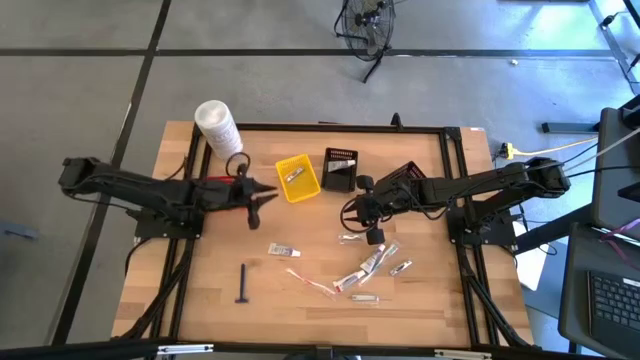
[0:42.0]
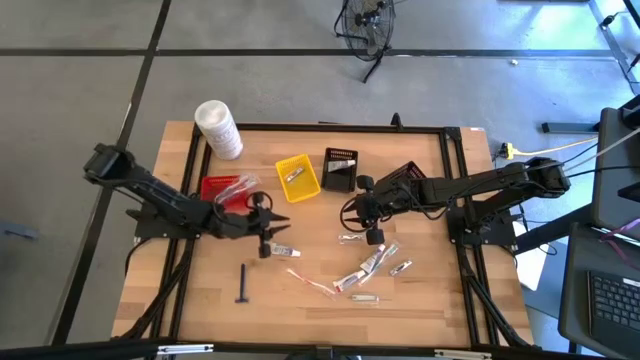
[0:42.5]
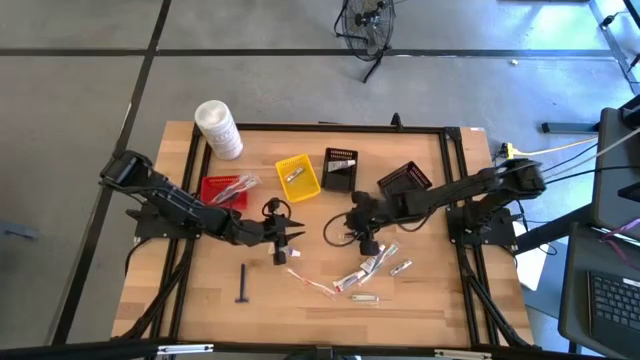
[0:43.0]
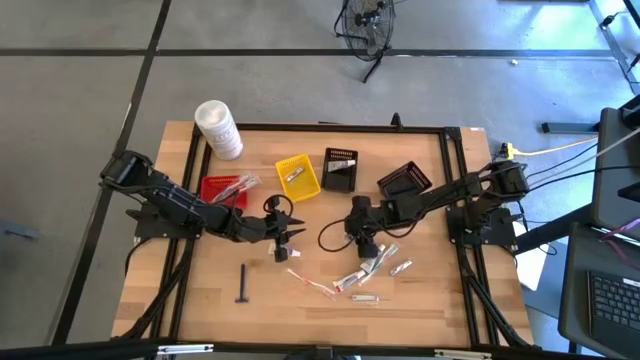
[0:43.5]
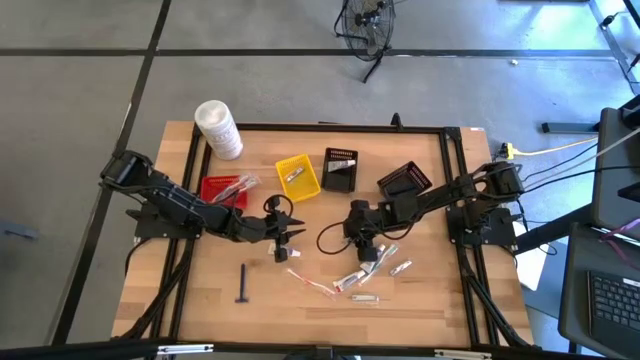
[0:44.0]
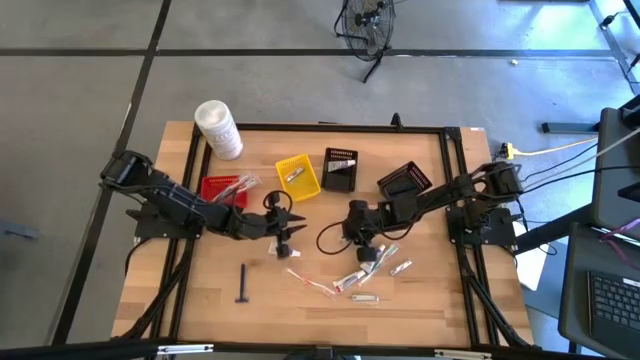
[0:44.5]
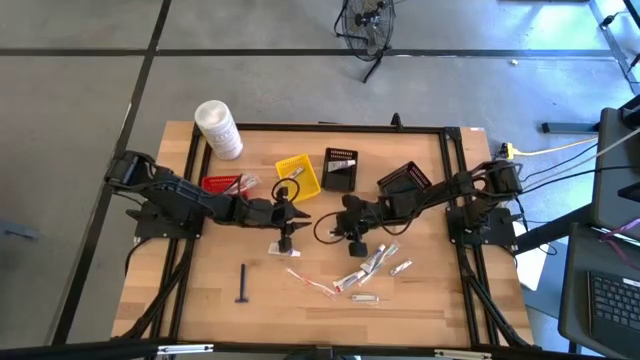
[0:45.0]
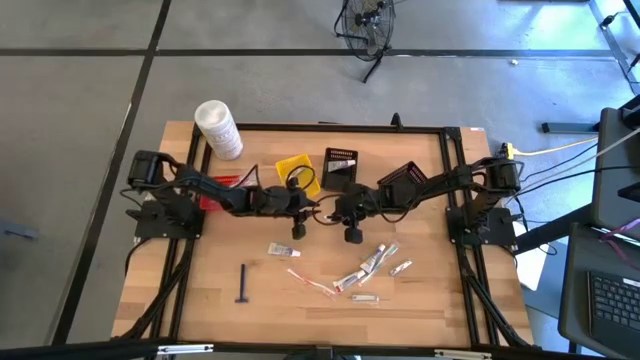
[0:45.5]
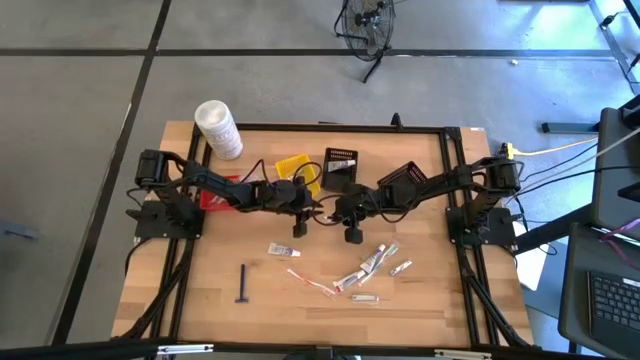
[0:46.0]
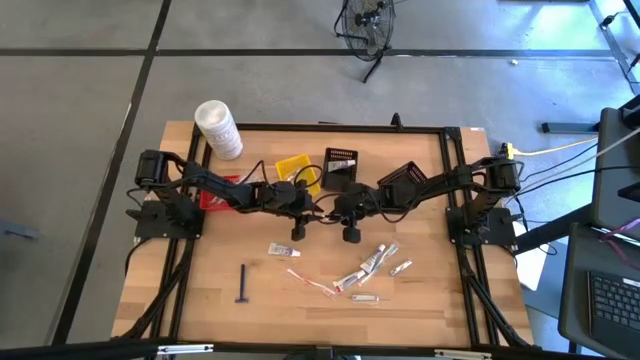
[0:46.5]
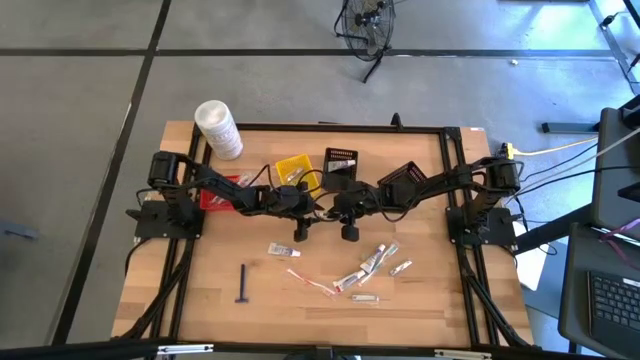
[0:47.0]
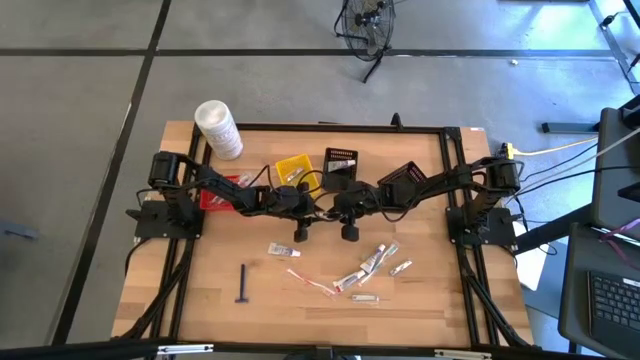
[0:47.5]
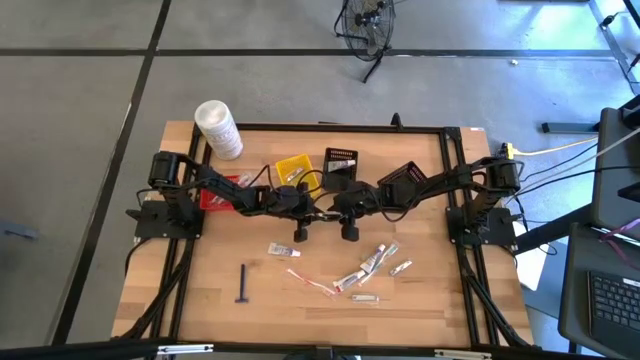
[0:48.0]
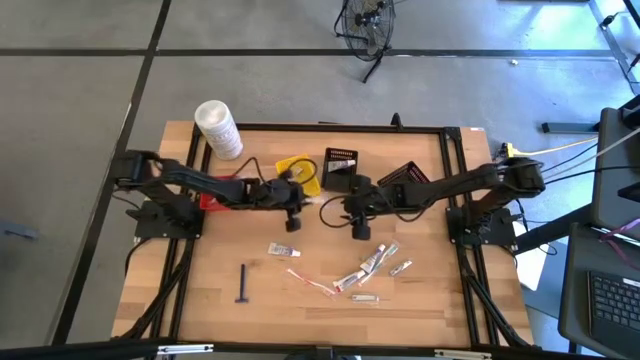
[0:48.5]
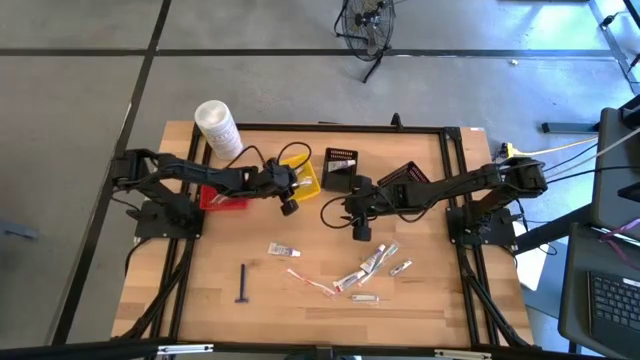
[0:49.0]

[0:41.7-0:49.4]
Task: Pick & Place Travel size toiletries
Put the nail cutter into the yellow bin

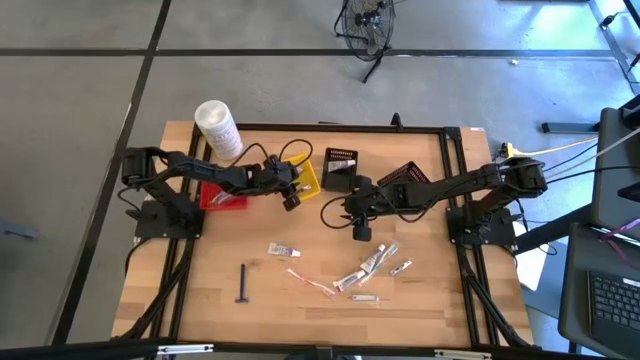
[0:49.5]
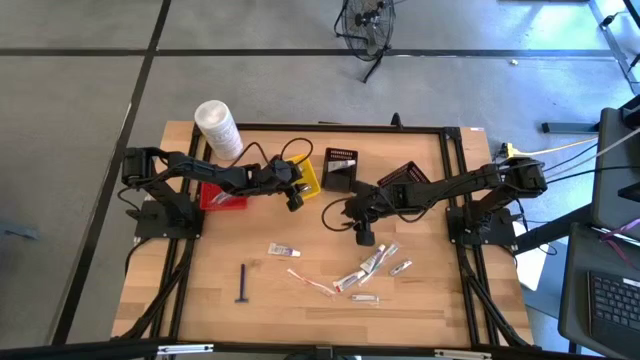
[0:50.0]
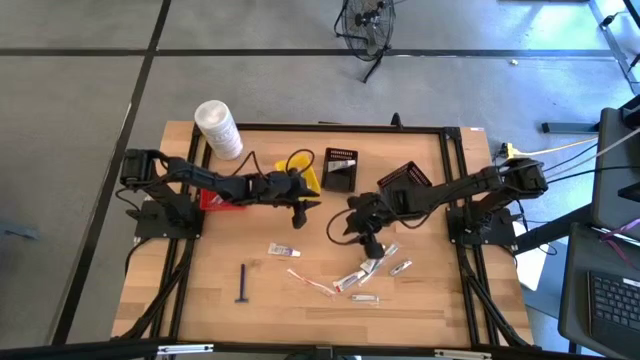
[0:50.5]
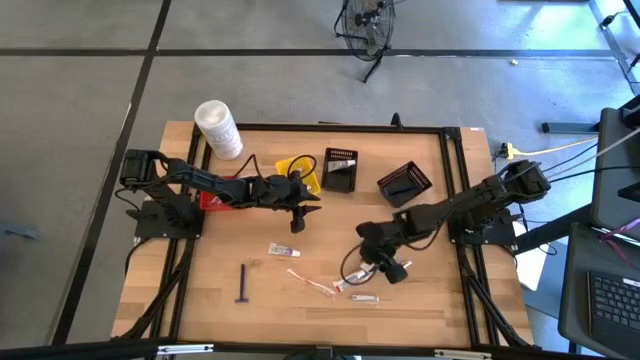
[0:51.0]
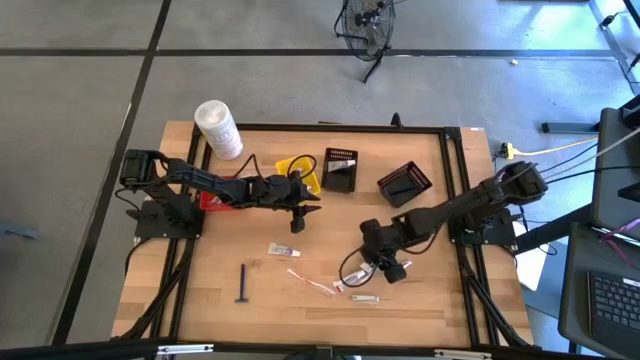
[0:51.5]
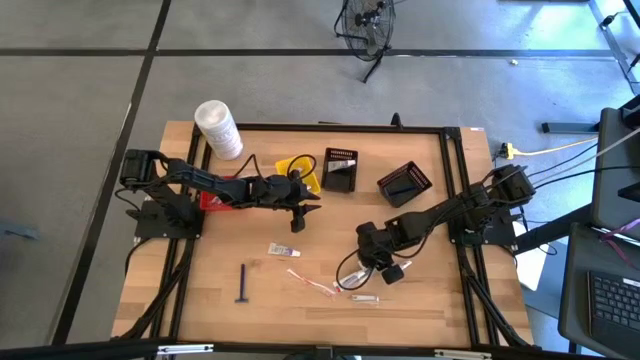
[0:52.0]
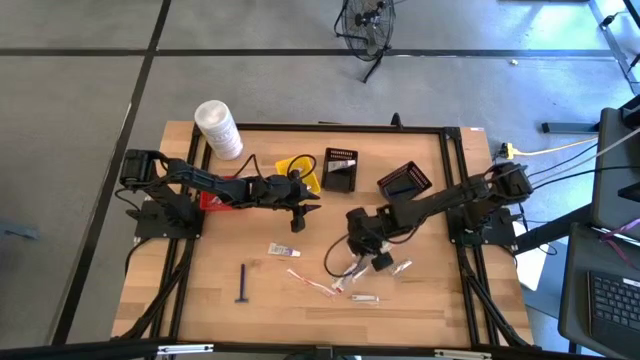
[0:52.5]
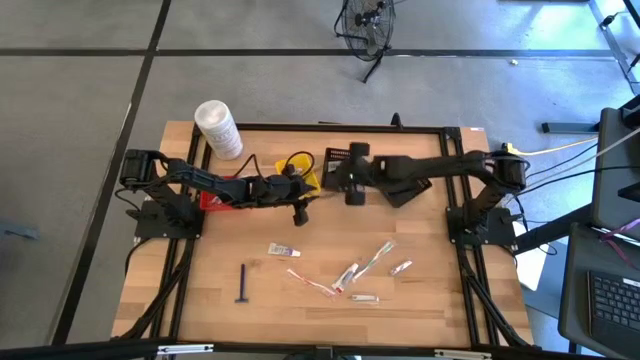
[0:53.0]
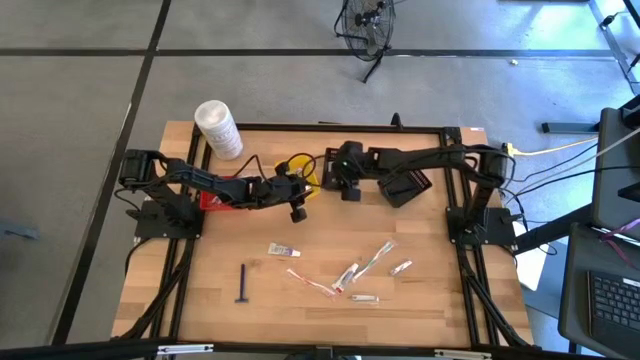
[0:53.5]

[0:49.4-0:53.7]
Put the toothpaste into the left black bin

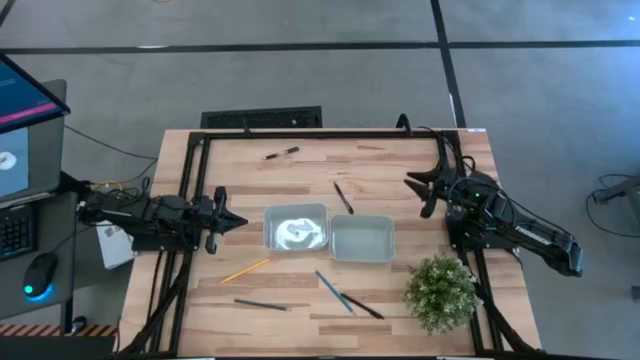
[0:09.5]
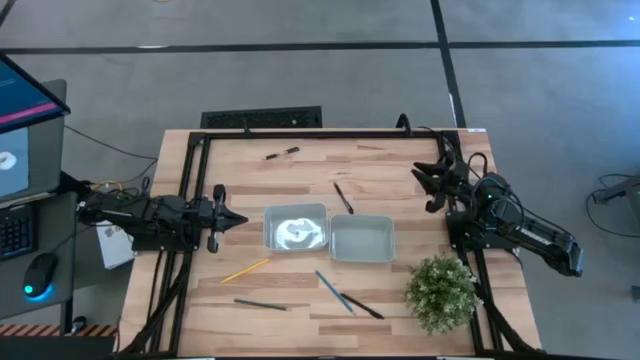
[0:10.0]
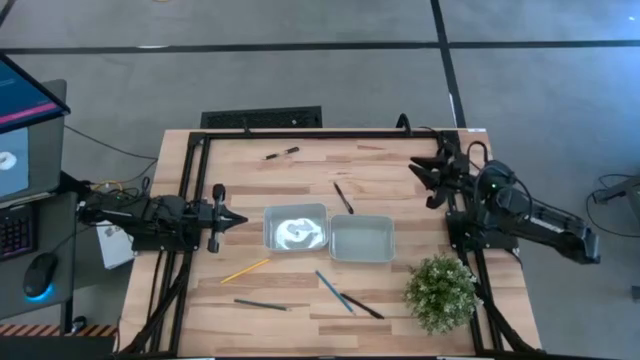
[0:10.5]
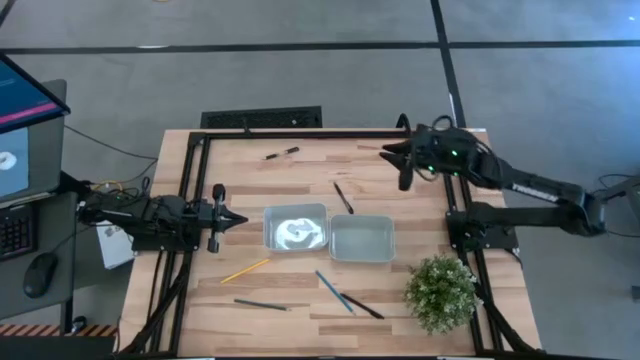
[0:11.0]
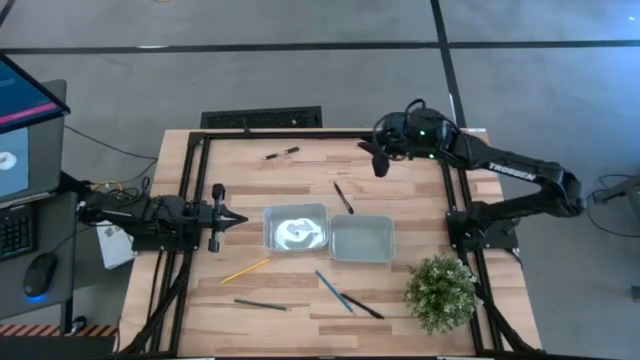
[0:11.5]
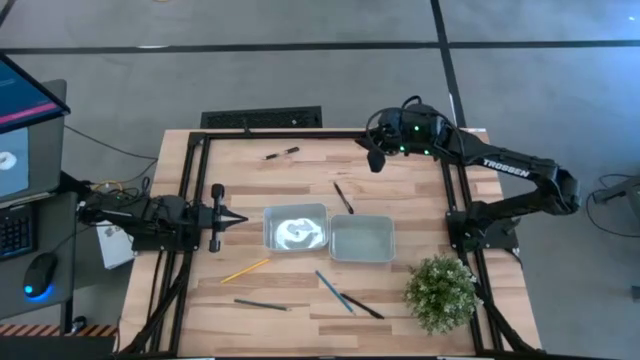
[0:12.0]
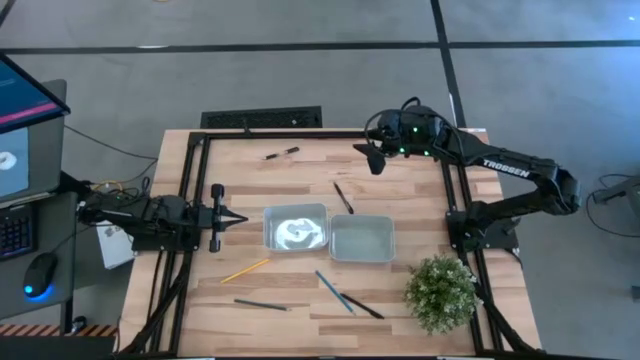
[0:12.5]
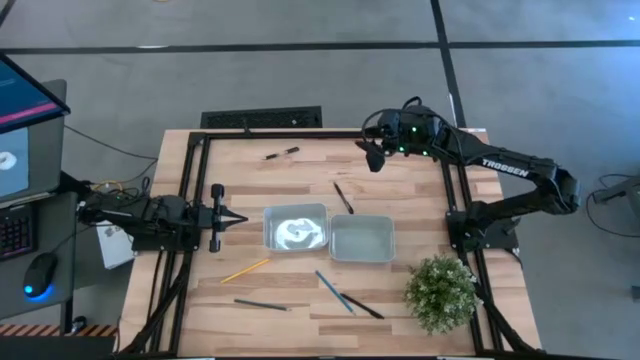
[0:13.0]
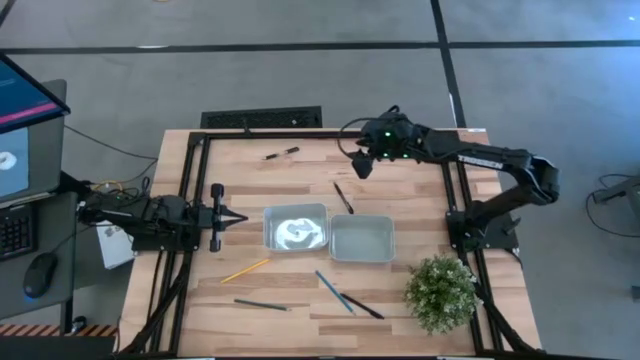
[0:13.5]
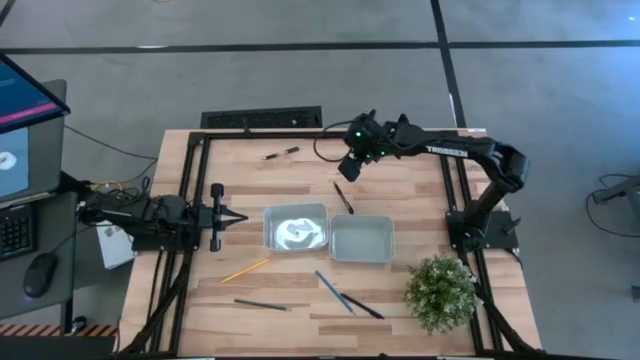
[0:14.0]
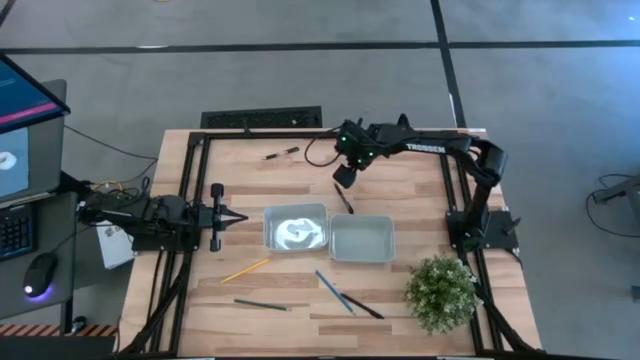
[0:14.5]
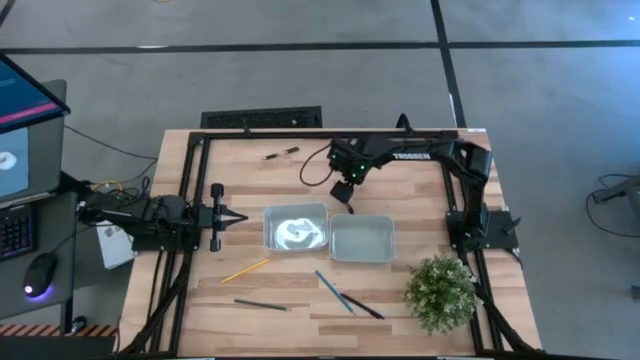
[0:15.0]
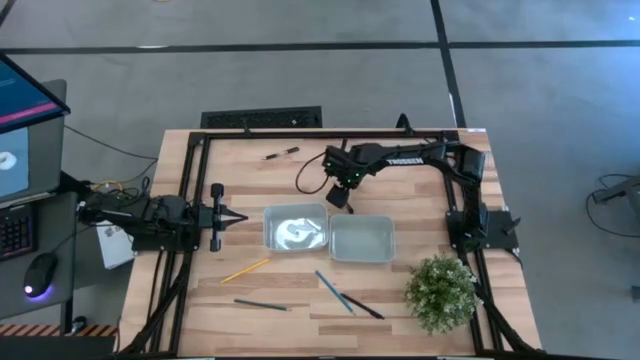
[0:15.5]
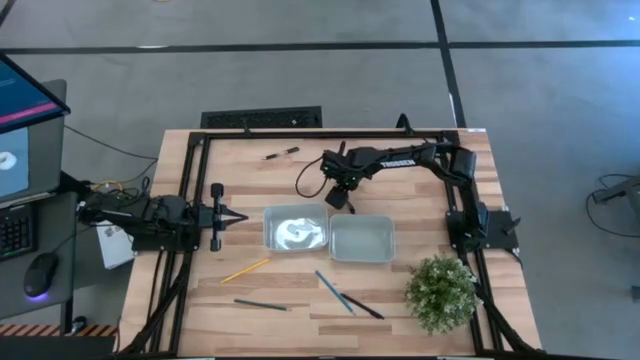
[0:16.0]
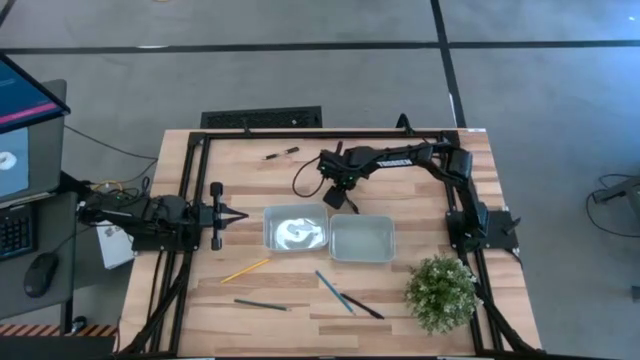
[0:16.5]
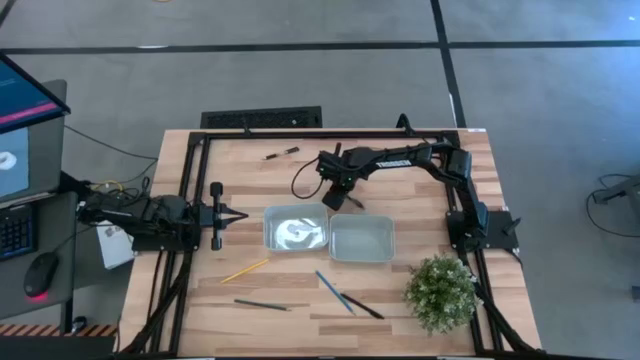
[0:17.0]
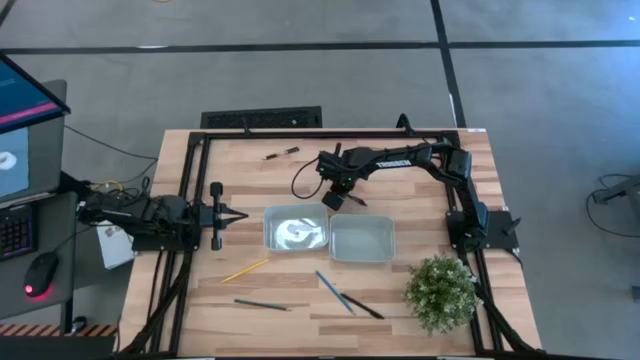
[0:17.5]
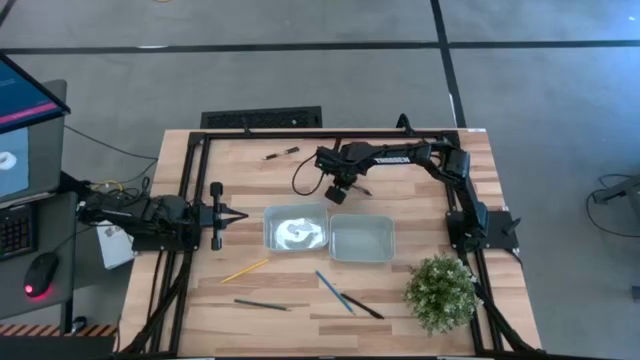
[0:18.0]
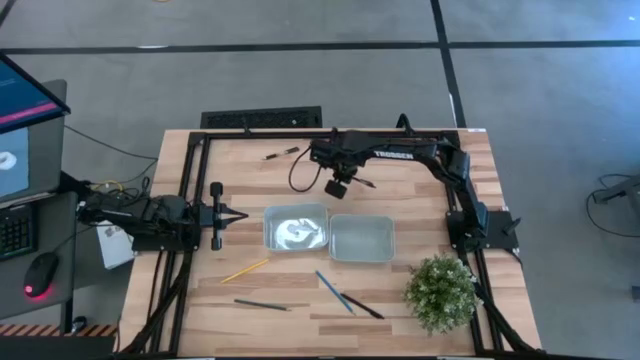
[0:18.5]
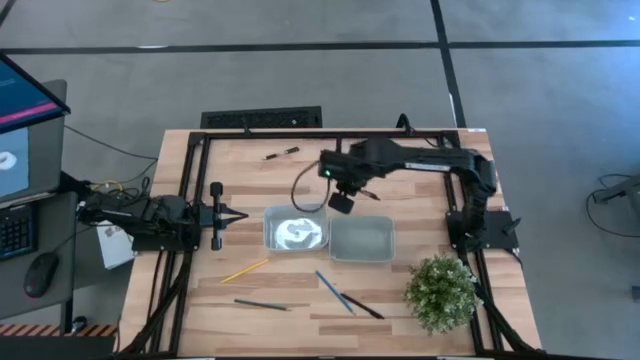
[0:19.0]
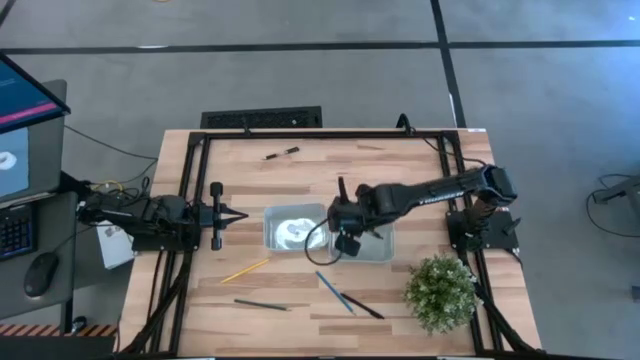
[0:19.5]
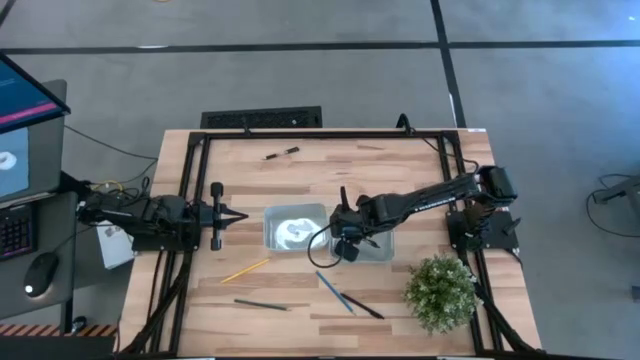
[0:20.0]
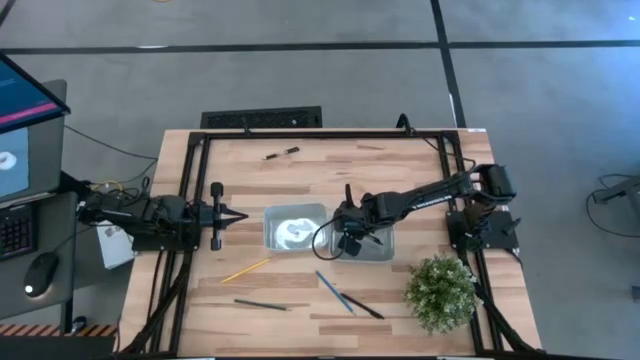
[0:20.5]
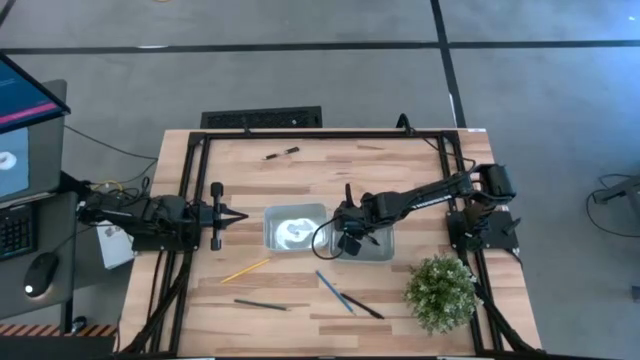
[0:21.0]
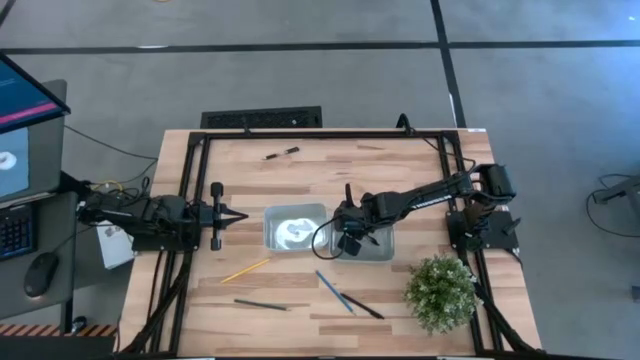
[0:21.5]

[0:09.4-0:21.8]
Task: Sort pens & pencils
Put the middle black pen into the right gray bin
